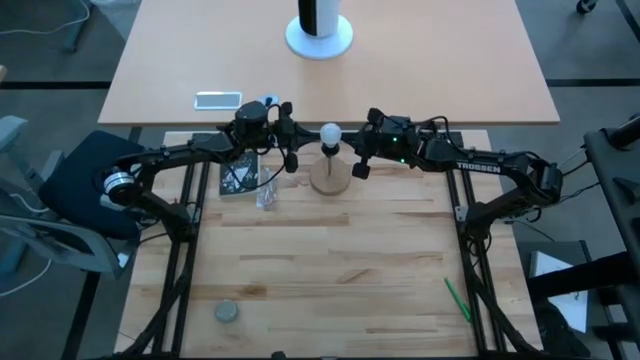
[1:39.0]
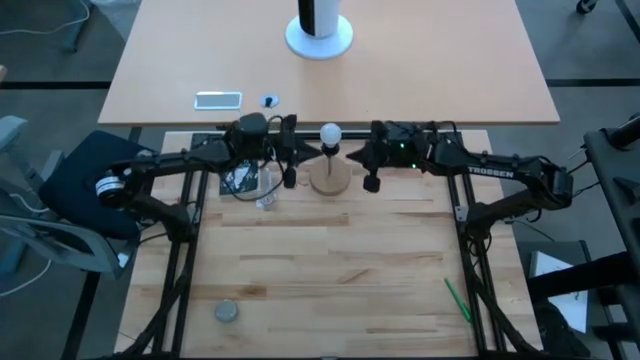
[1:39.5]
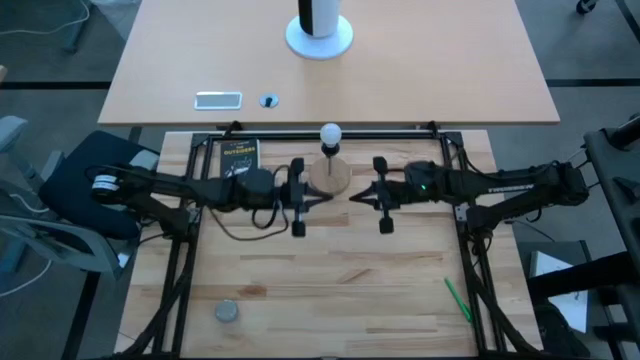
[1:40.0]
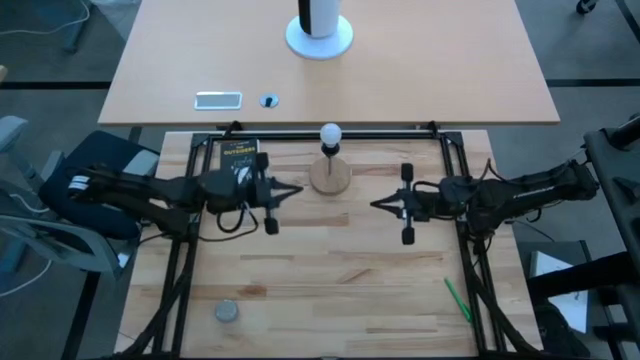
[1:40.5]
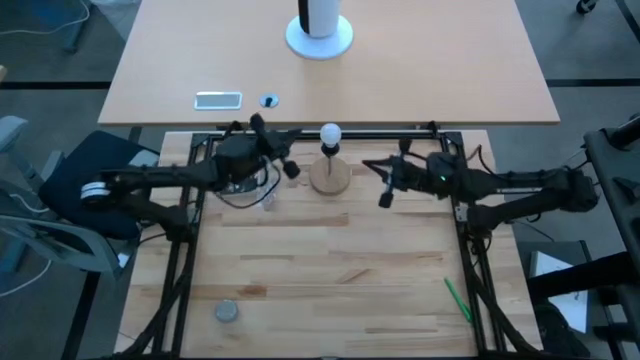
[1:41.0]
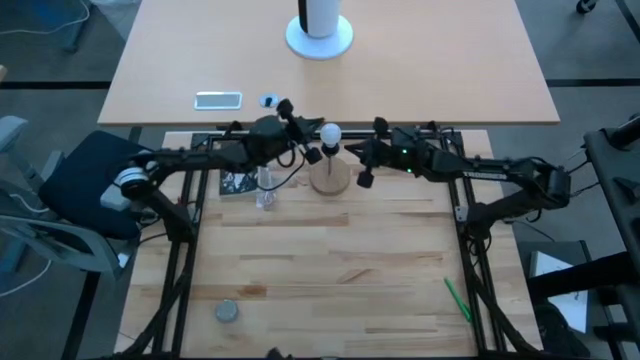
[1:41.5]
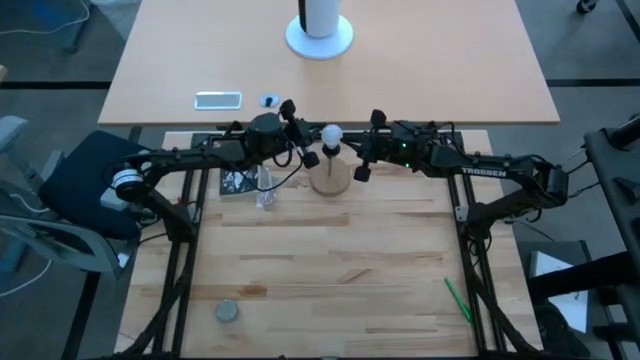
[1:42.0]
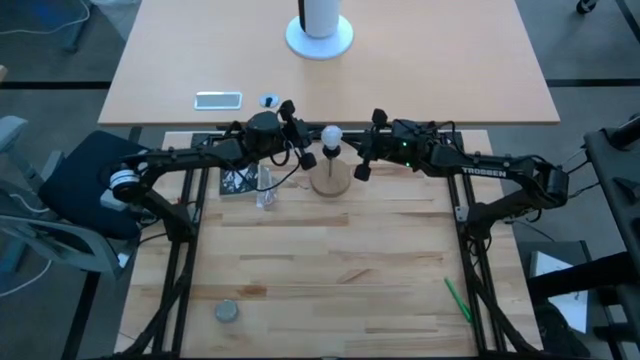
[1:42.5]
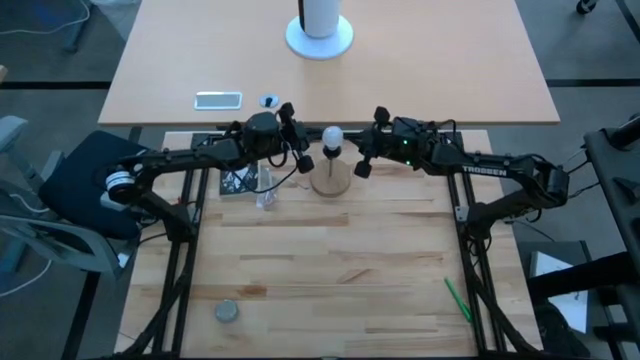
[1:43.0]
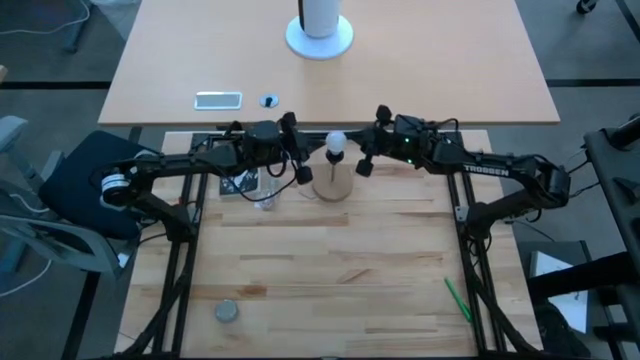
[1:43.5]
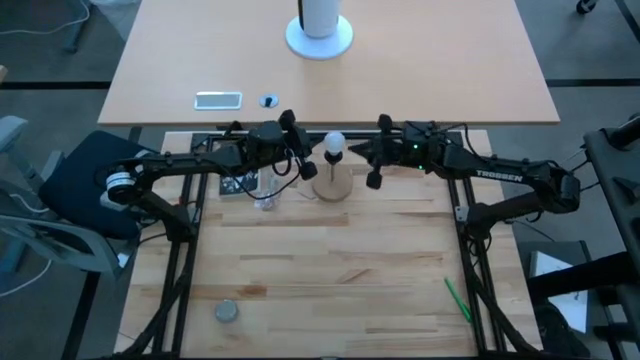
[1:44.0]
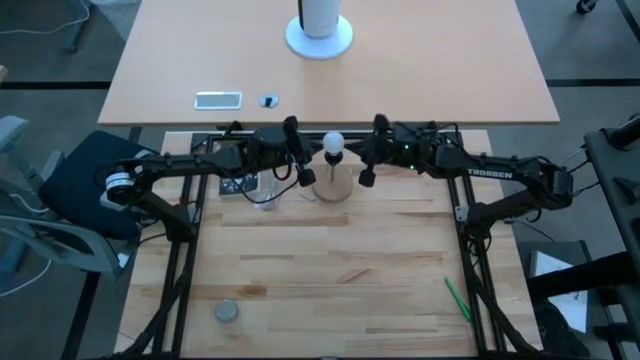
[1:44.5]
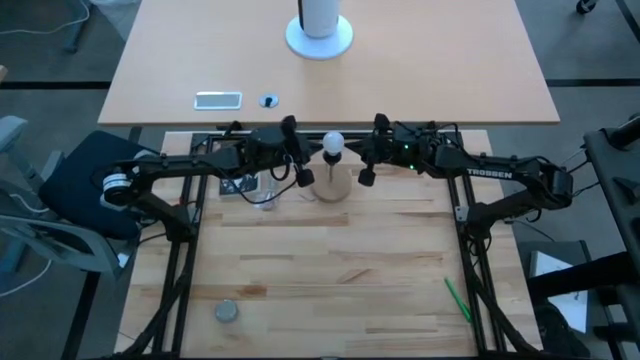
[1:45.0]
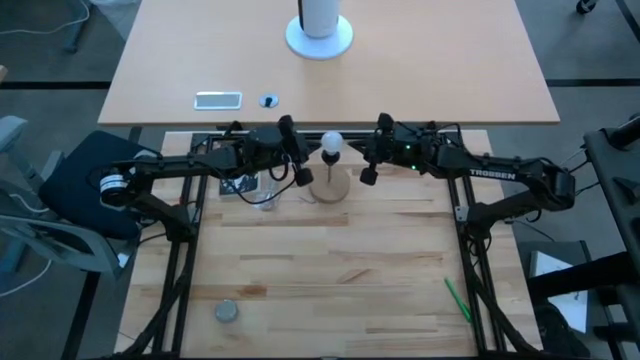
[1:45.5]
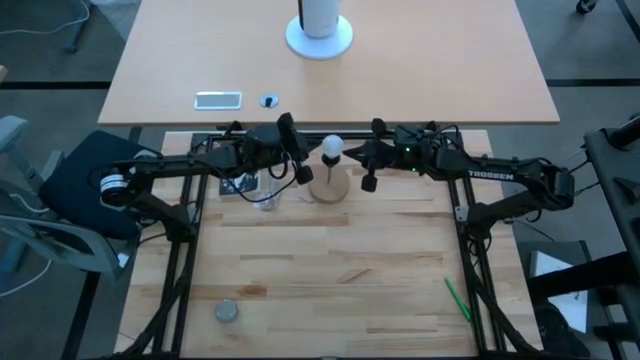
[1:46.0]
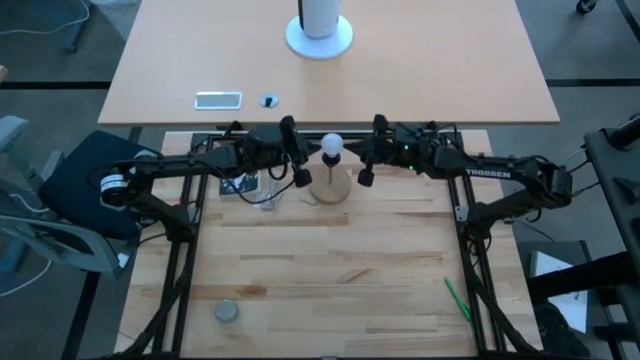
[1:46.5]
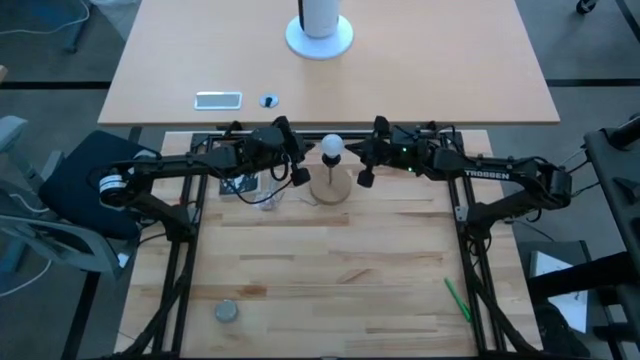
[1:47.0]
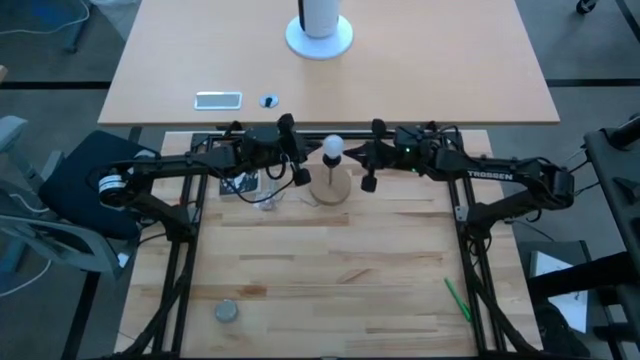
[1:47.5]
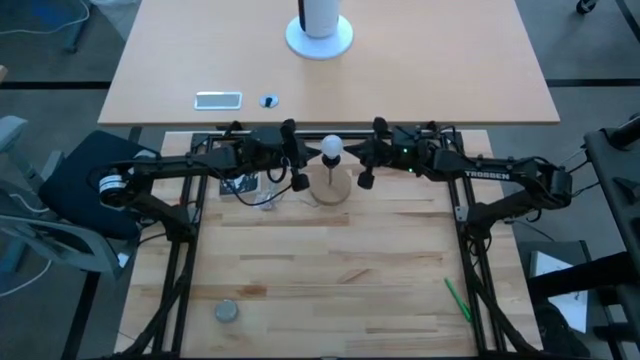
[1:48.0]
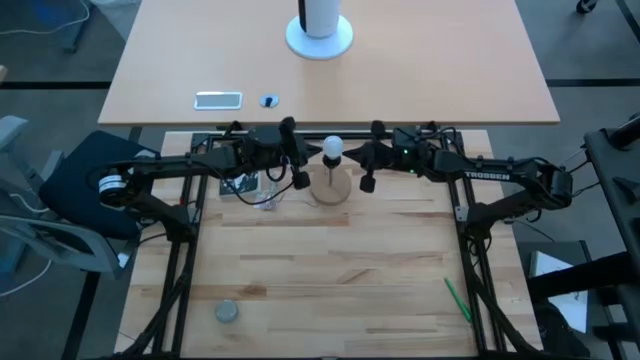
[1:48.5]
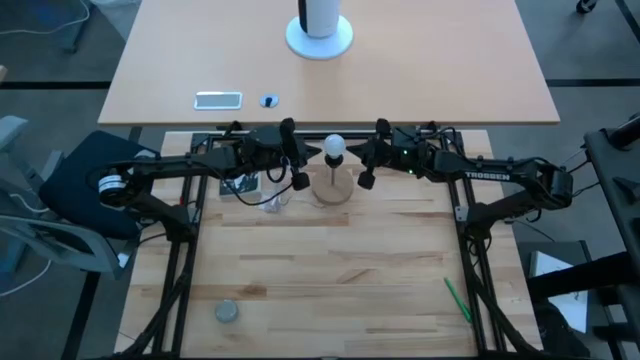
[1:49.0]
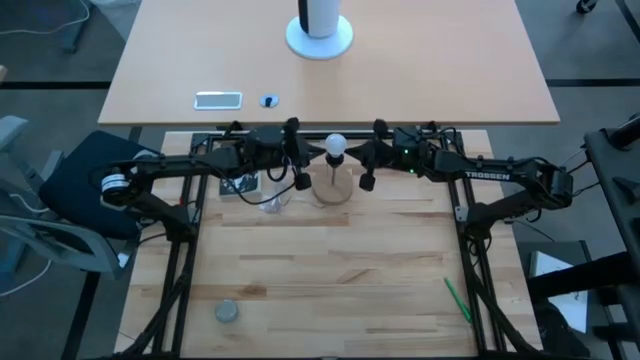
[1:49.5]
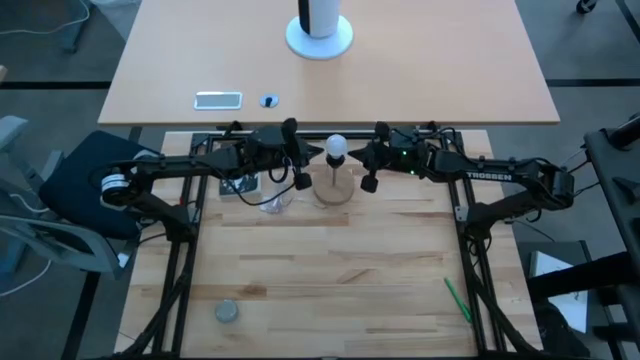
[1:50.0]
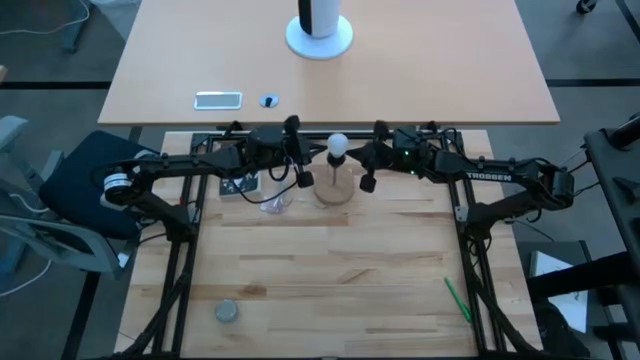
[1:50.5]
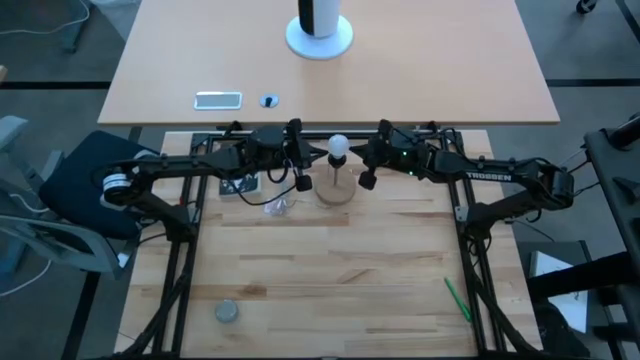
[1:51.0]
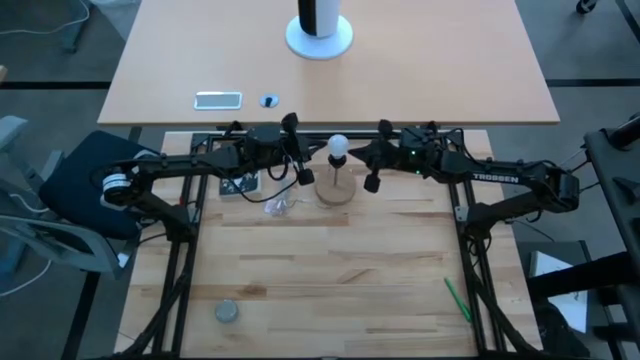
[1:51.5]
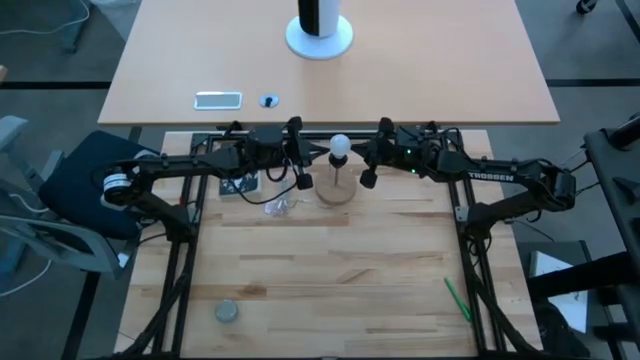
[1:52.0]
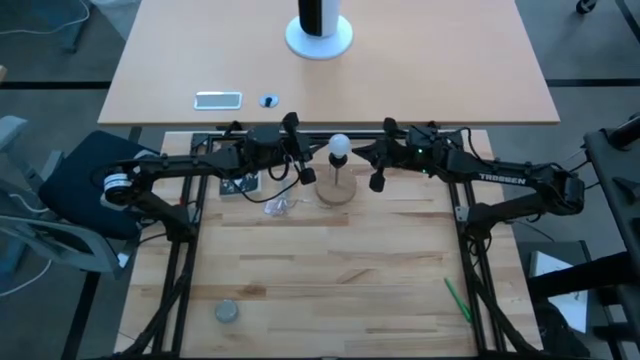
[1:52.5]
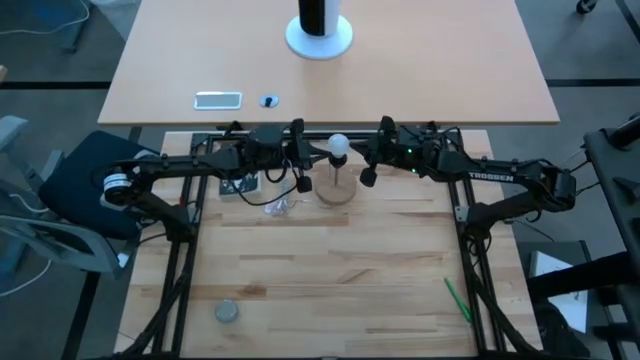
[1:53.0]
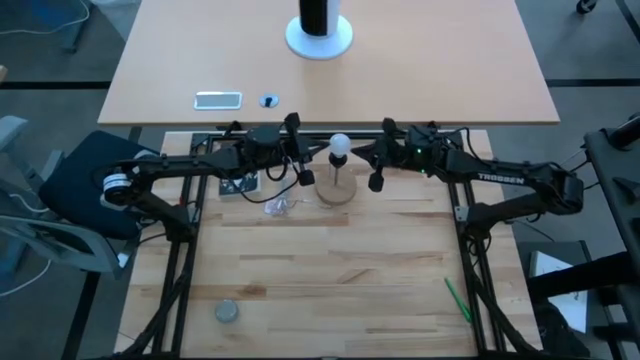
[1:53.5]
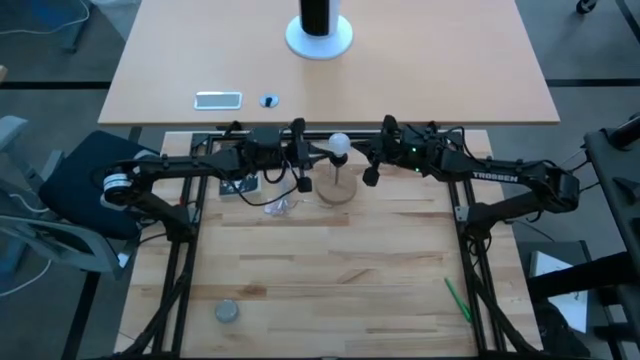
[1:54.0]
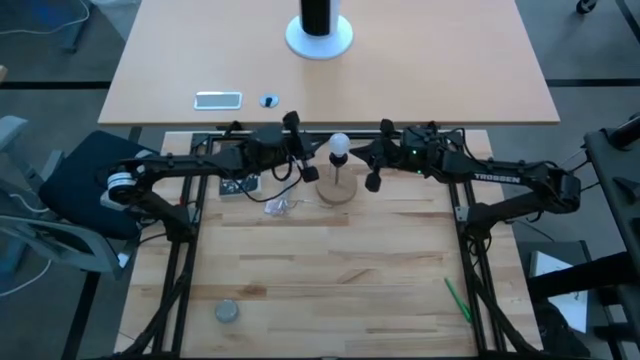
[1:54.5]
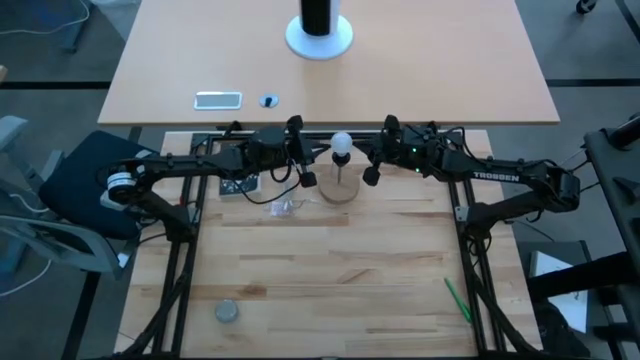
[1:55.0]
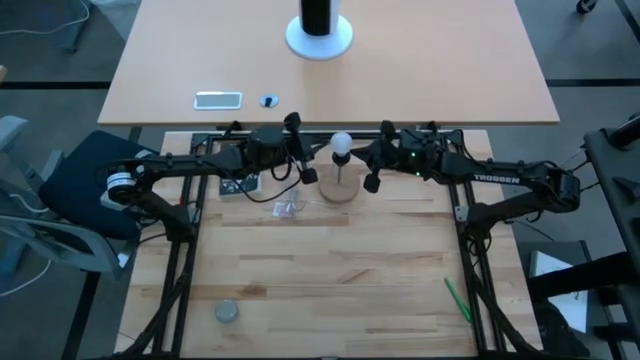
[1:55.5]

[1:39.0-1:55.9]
Task: Screw lightbulb
Remove the lightbulb from the black lamp
